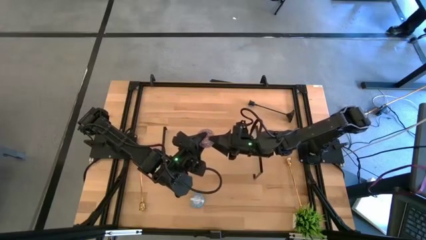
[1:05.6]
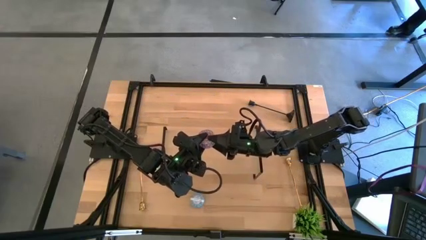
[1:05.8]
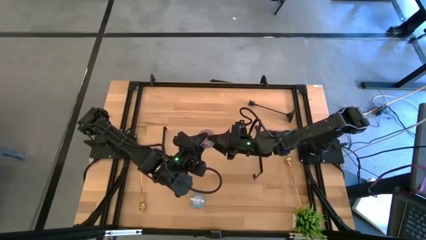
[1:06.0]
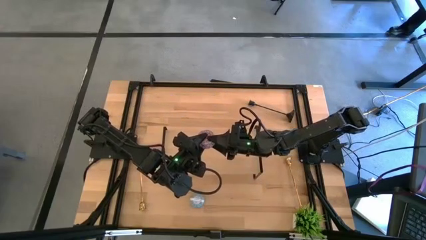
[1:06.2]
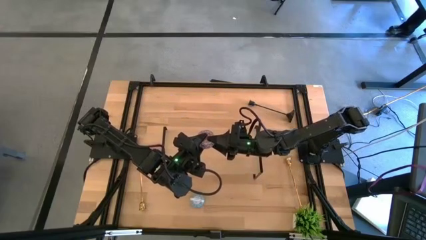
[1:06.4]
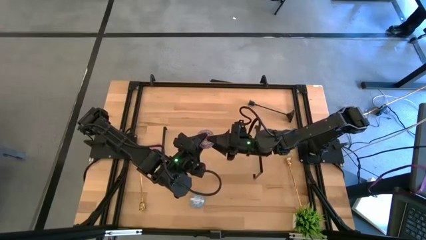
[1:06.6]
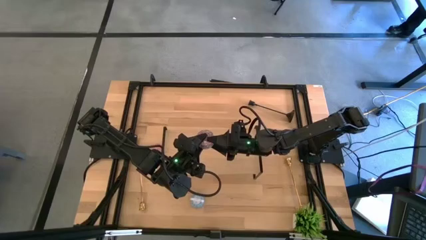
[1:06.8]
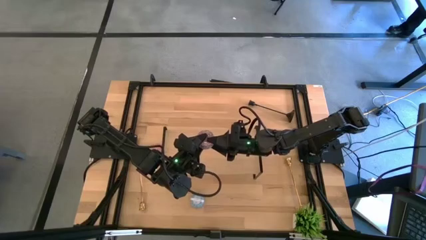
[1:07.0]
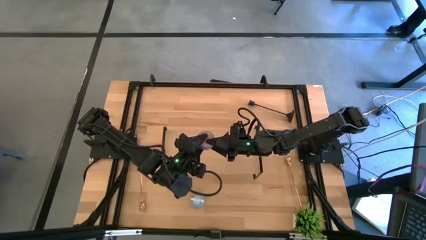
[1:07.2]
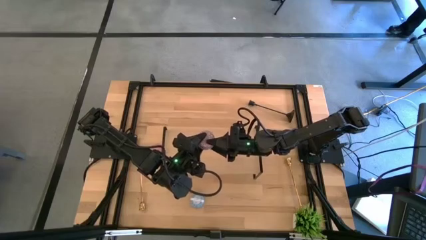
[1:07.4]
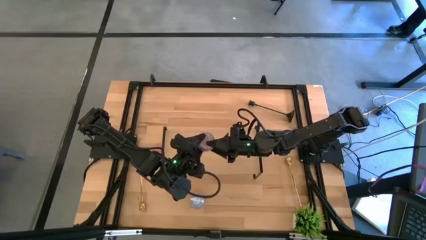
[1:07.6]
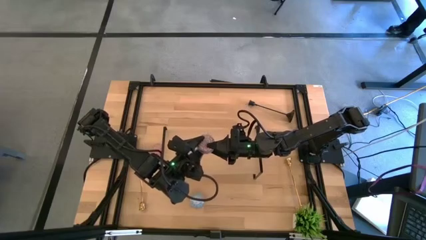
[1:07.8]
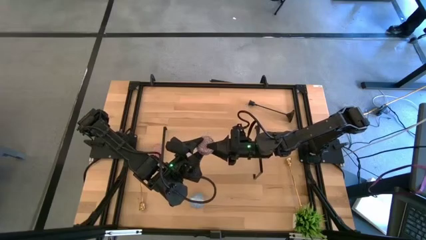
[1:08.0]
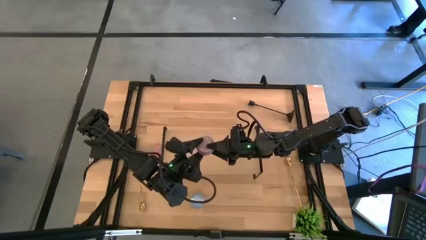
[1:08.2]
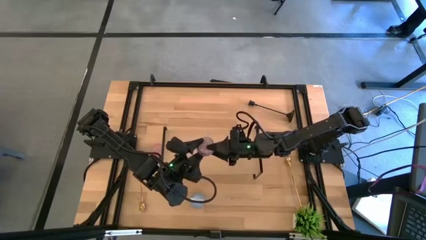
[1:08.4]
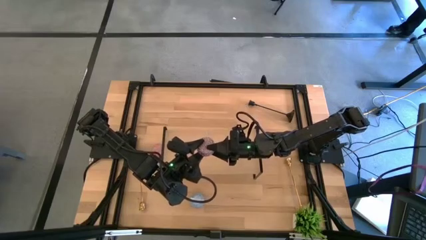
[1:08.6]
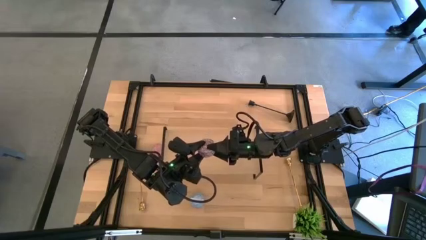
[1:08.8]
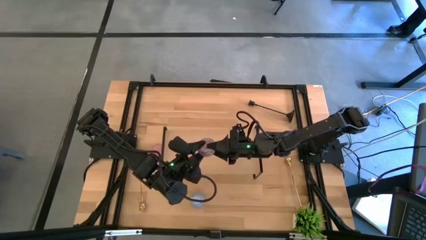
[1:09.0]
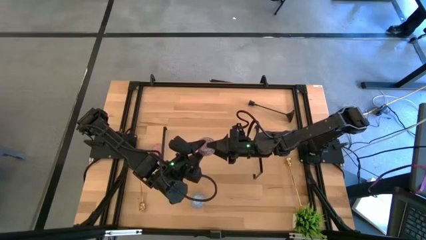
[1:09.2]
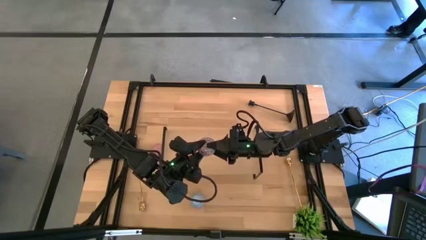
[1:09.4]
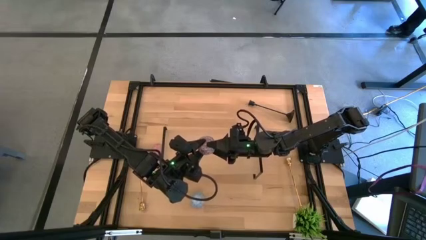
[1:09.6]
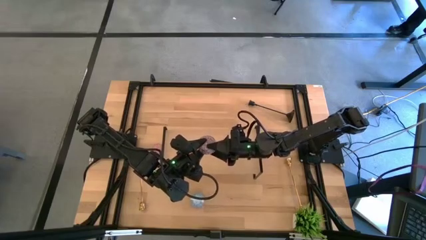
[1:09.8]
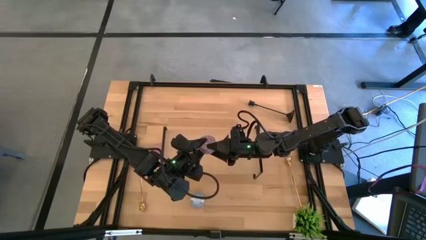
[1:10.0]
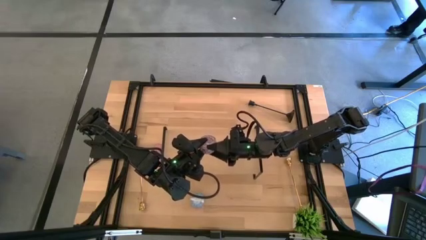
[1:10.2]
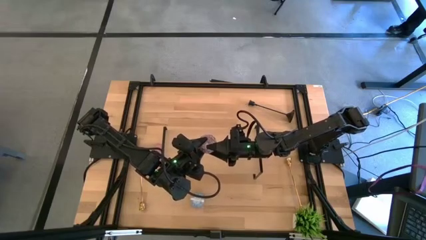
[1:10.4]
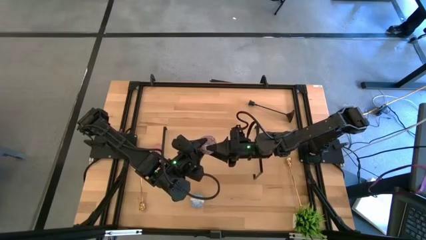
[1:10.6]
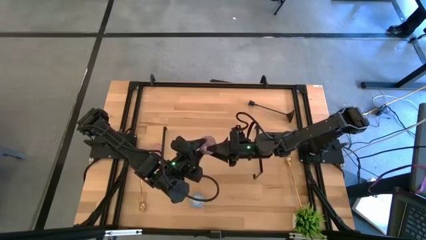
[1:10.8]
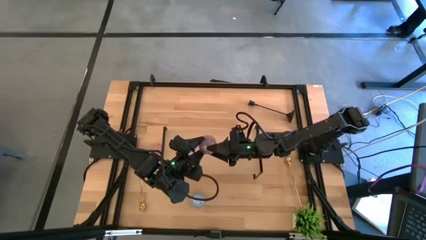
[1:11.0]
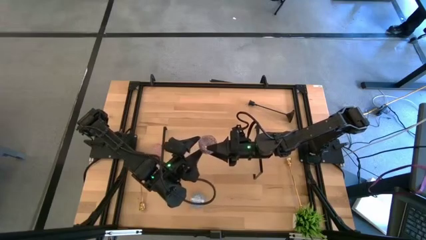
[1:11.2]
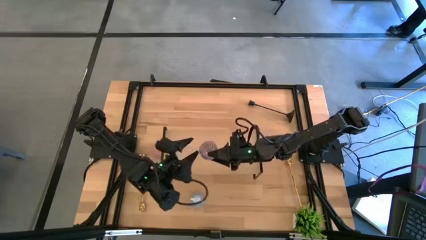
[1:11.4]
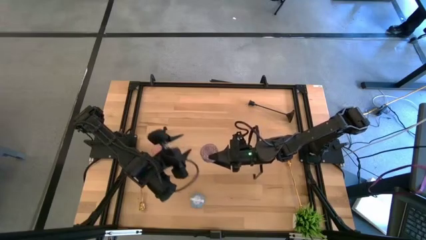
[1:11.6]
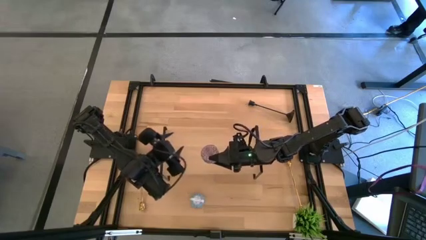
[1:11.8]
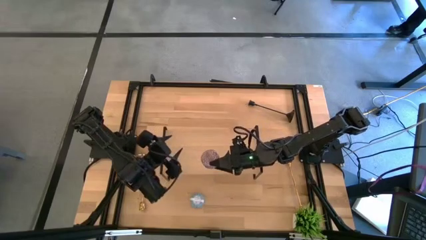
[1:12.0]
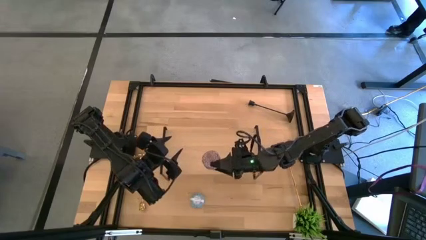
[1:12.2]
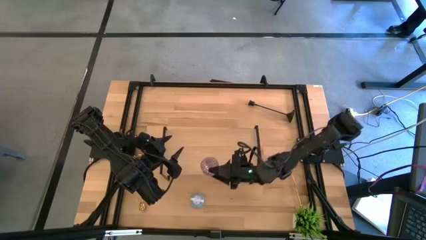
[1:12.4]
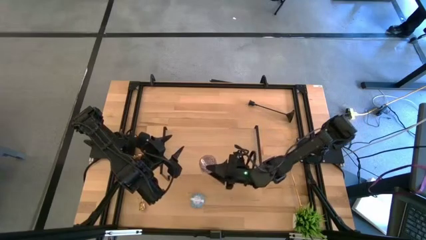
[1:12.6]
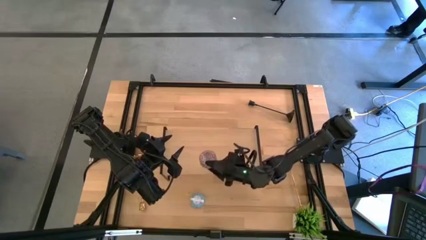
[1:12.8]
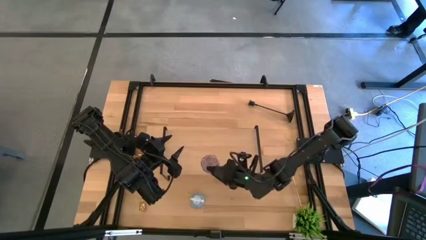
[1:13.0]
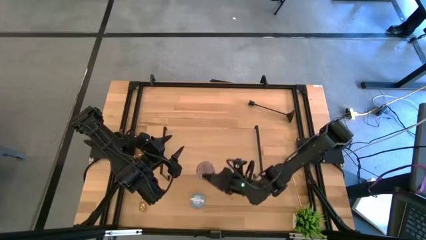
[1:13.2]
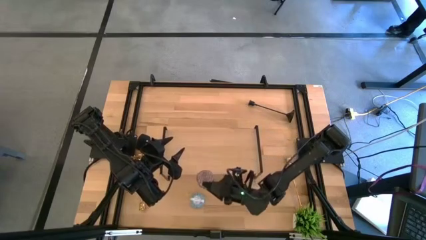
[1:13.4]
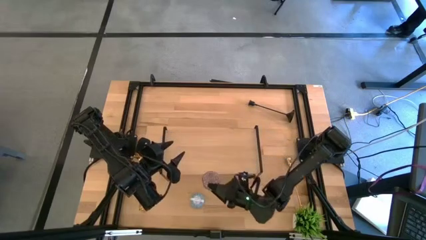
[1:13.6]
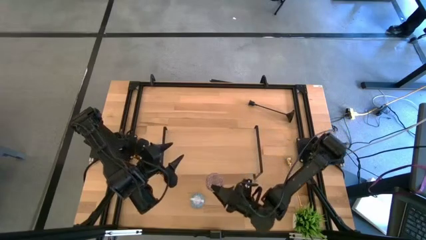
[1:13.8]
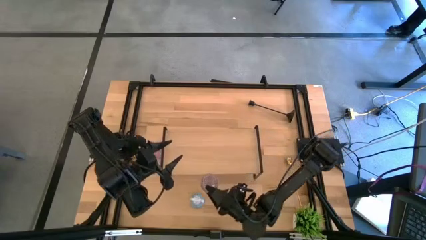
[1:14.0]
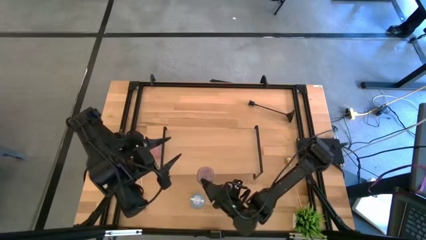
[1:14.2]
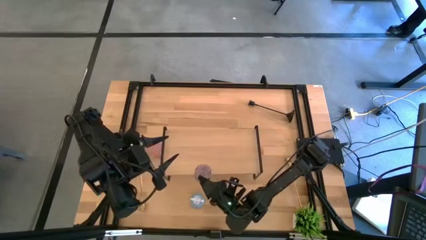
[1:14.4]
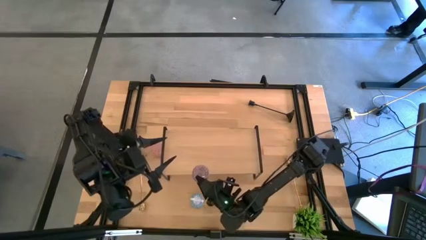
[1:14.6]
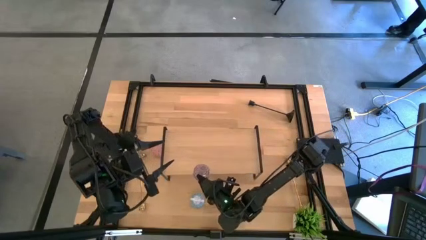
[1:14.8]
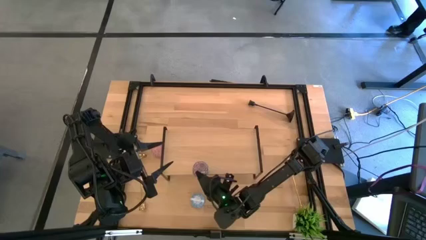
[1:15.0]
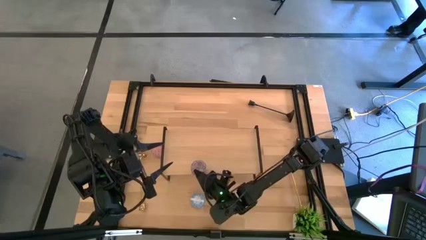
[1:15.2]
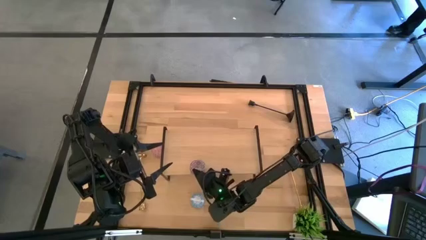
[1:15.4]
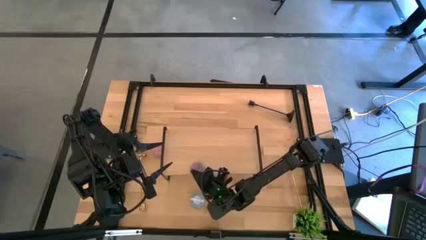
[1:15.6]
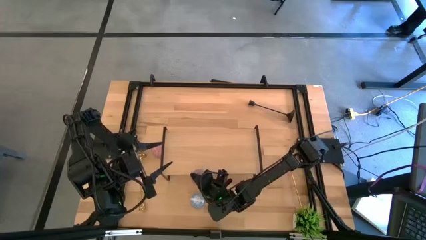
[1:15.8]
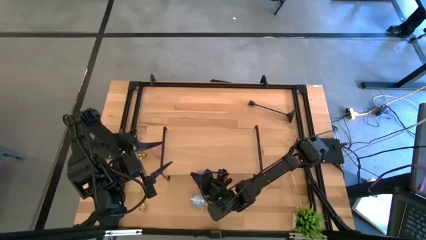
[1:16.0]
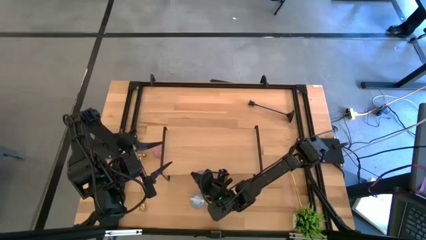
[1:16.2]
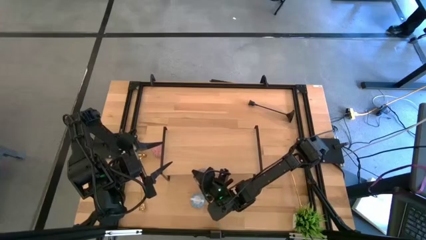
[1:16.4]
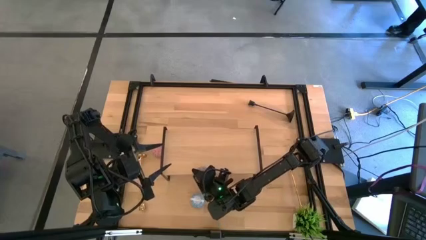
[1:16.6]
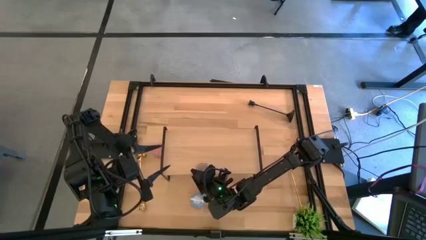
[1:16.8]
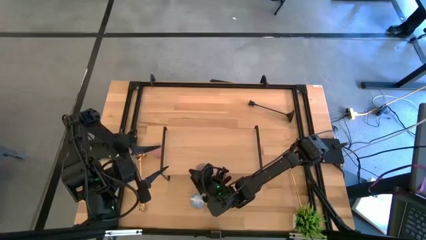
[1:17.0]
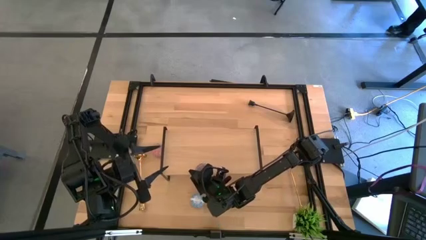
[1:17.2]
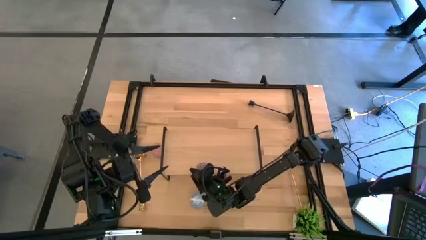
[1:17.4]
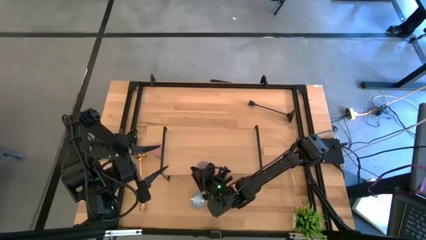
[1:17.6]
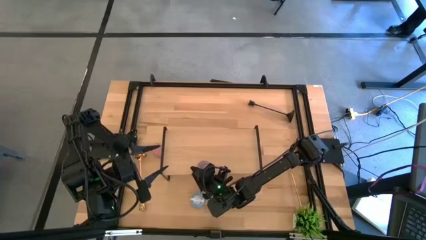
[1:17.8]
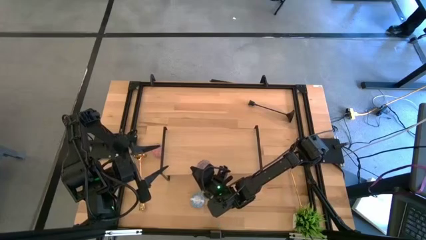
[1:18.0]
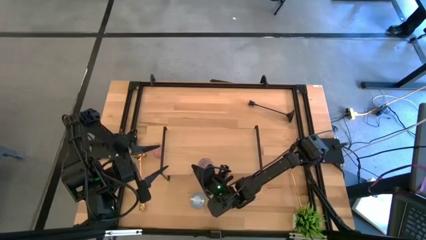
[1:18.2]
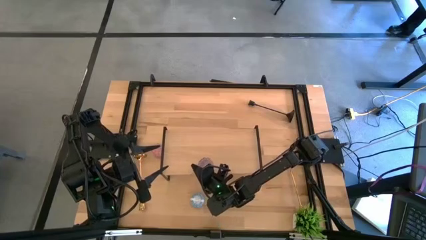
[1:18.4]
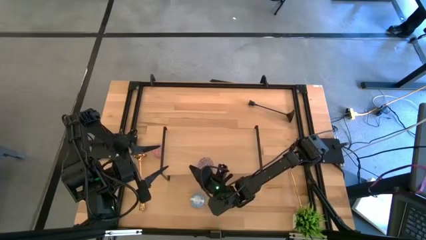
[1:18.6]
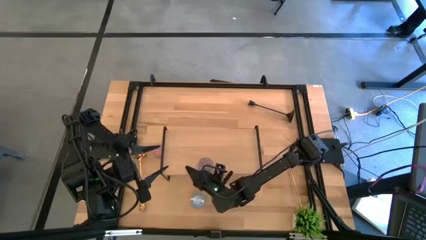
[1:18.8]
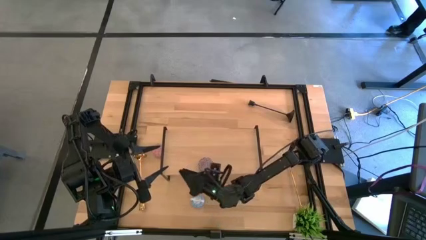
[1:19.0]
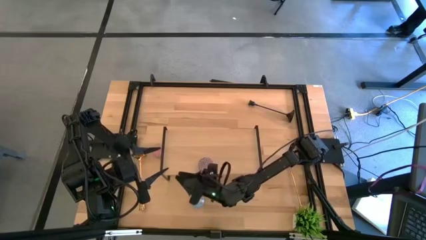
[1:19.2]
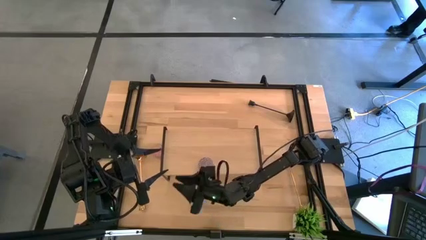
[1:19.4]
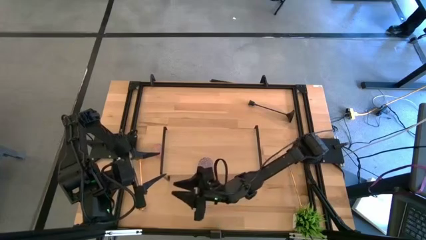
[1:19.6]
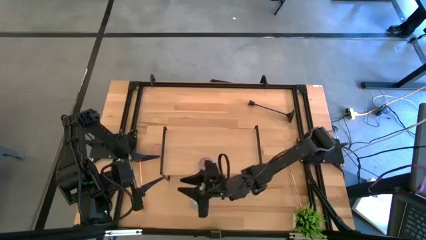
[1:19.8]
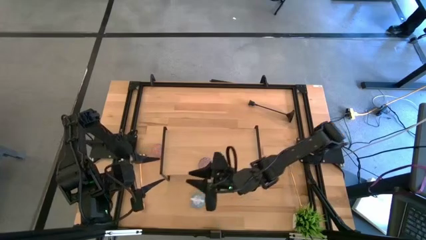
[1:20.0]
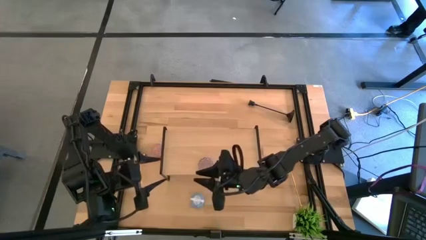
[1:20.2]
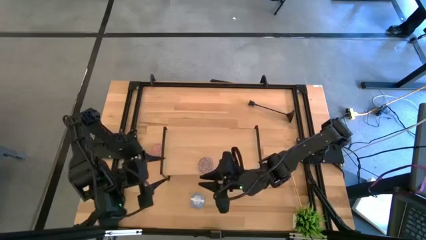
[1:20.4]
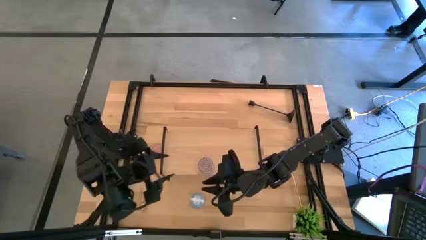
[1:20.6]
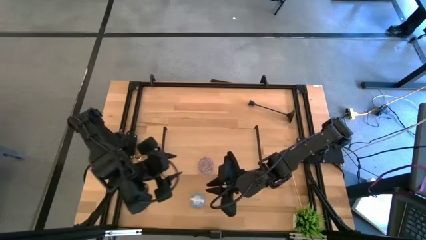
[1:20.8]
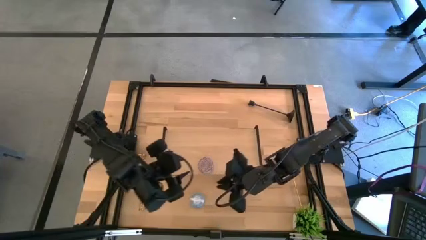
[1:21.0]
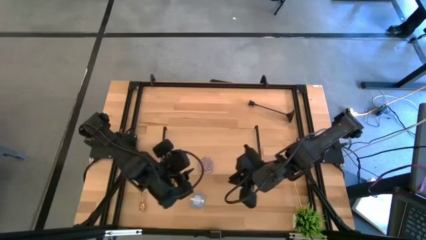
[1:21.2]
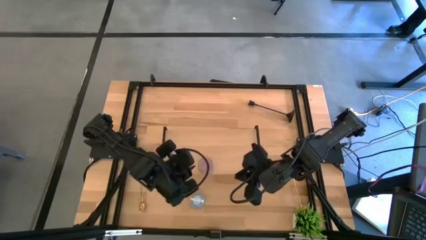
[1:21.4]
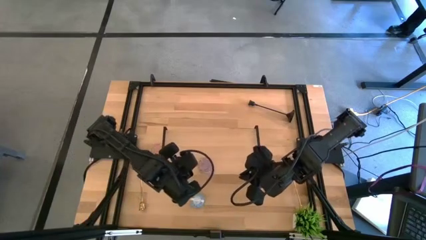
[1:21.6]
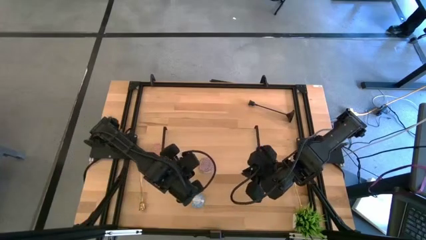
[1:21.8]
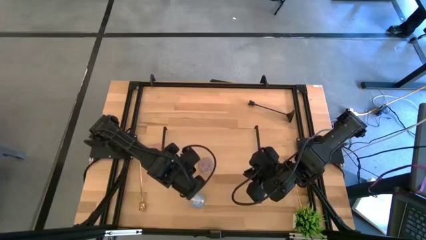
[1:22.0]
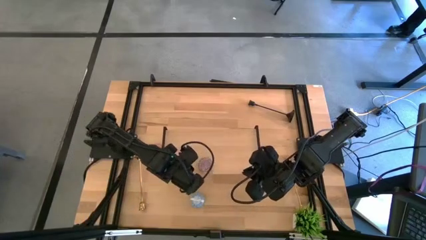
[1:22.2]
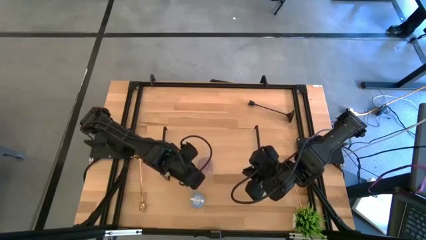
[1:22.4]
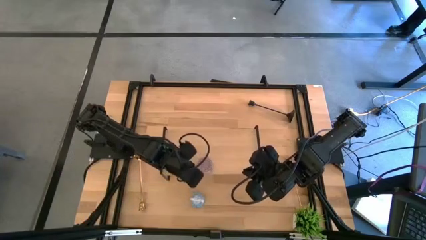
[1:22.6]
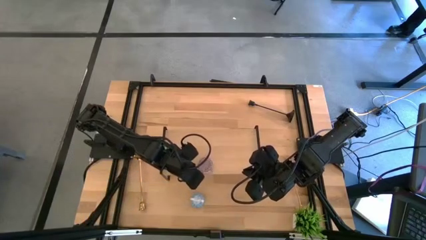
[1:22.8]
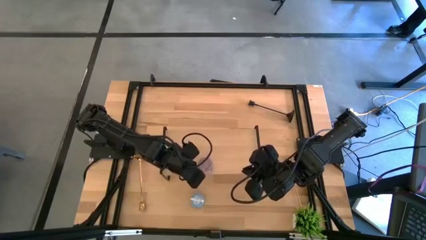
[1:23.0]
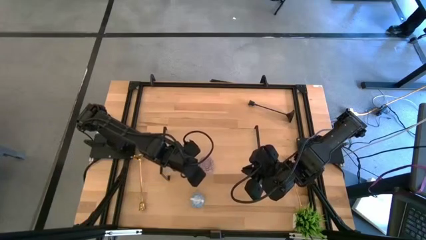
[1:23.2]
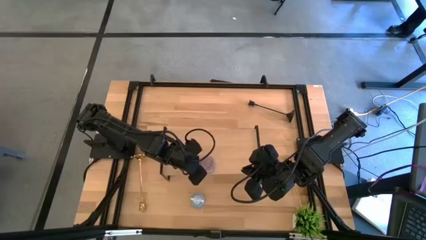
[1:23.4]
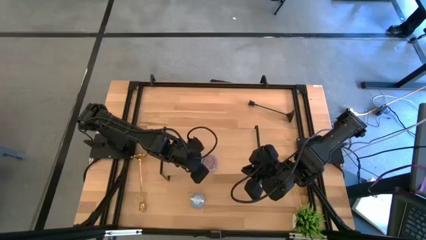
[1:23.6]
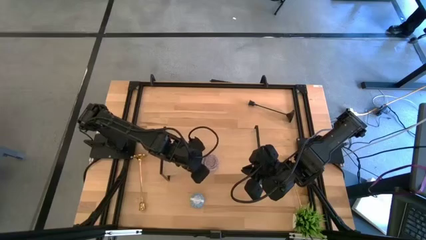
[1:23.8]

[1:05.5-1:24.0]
Task: Pick & Place candle stick holders
Put the red scented candle on the shelf
